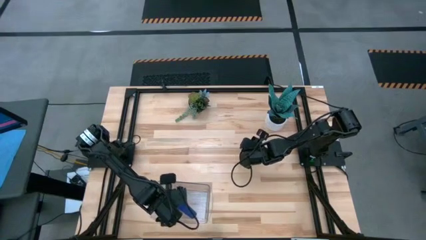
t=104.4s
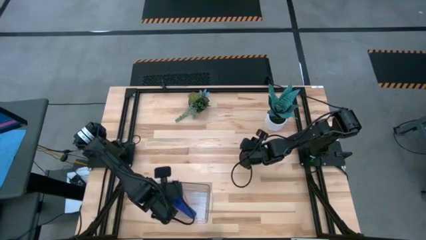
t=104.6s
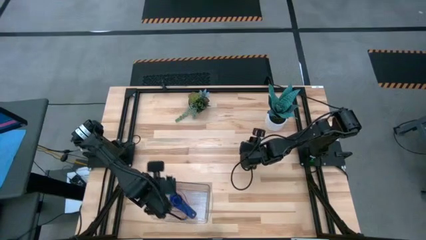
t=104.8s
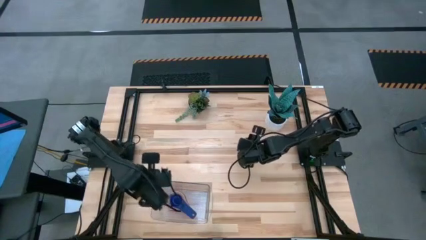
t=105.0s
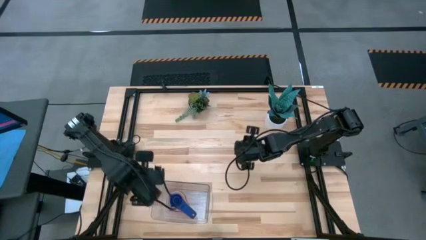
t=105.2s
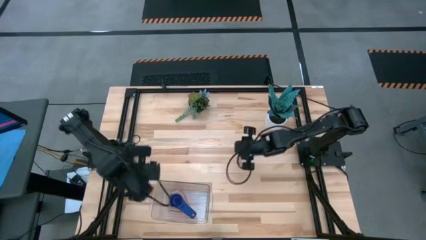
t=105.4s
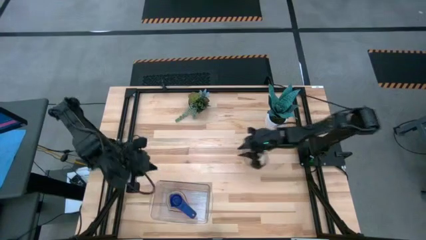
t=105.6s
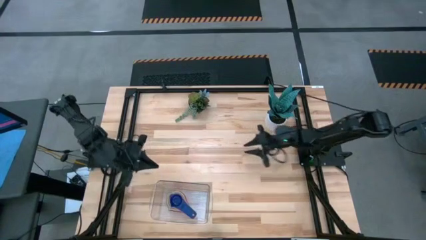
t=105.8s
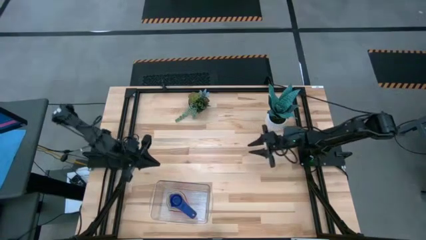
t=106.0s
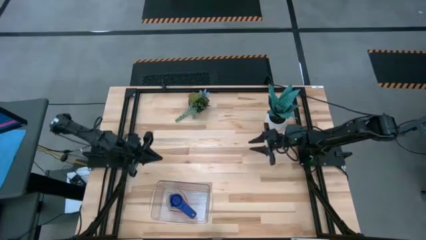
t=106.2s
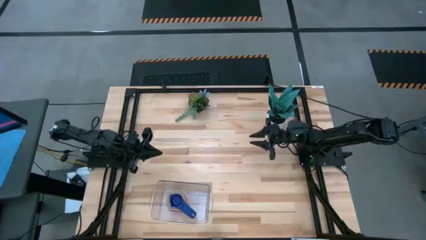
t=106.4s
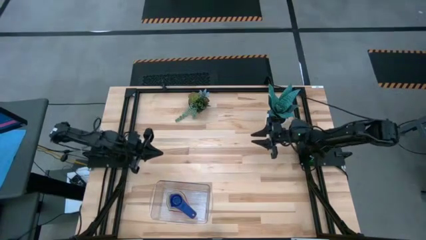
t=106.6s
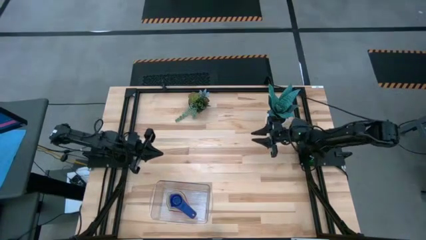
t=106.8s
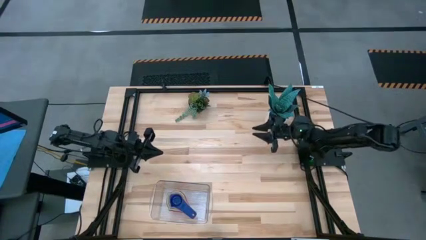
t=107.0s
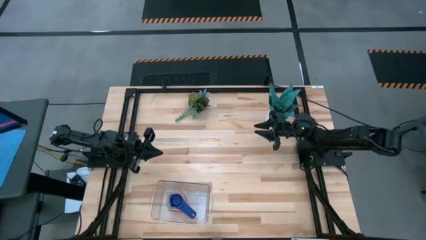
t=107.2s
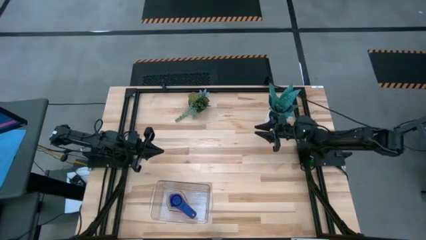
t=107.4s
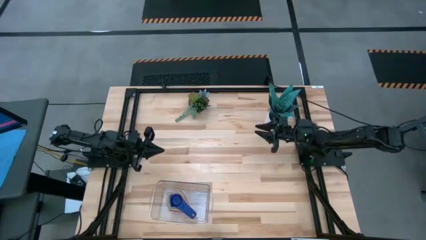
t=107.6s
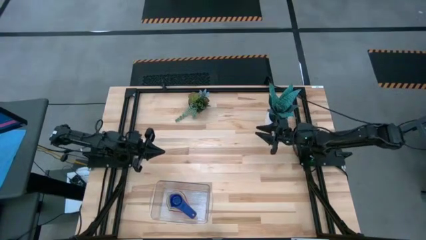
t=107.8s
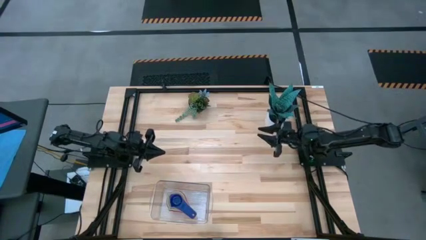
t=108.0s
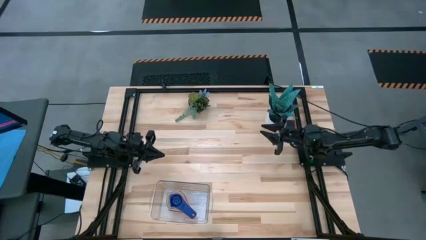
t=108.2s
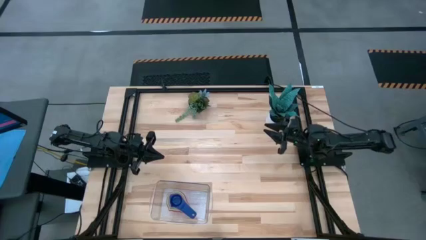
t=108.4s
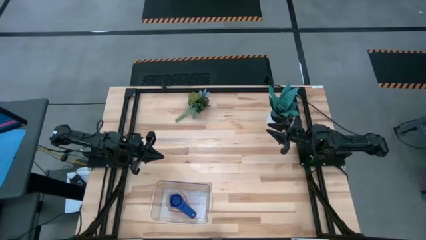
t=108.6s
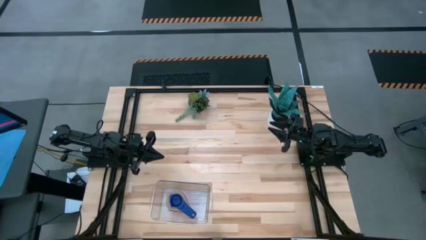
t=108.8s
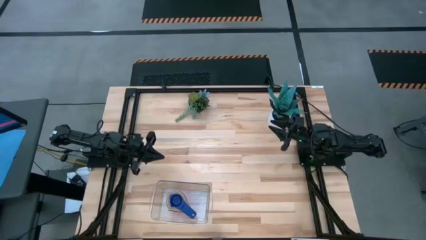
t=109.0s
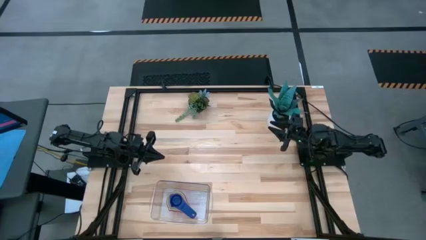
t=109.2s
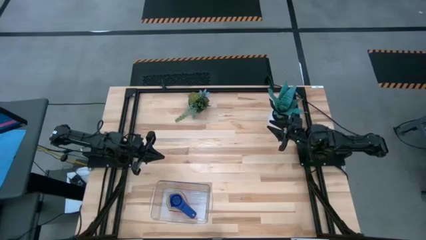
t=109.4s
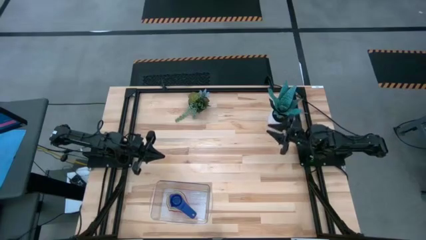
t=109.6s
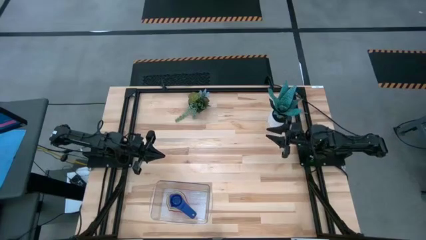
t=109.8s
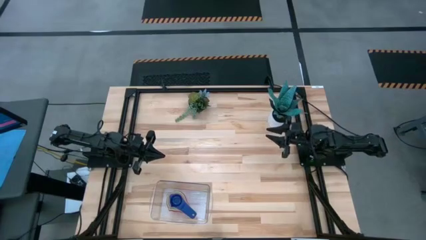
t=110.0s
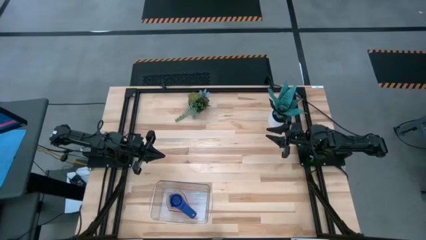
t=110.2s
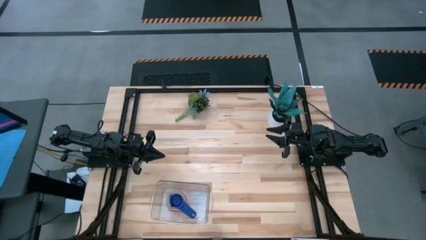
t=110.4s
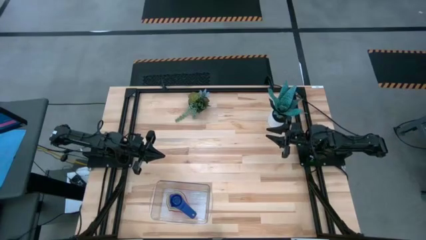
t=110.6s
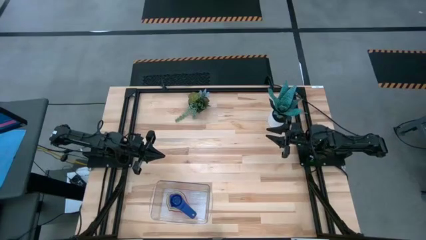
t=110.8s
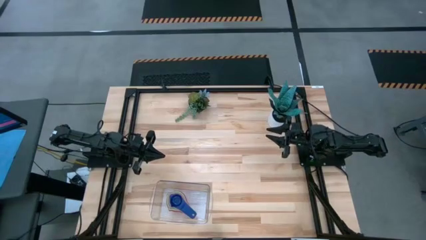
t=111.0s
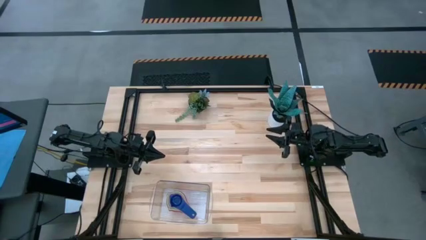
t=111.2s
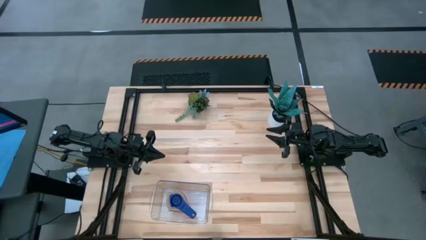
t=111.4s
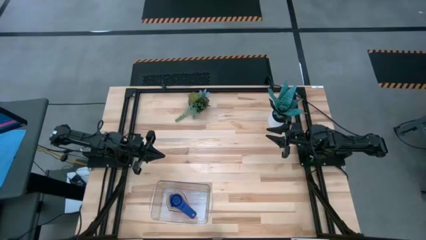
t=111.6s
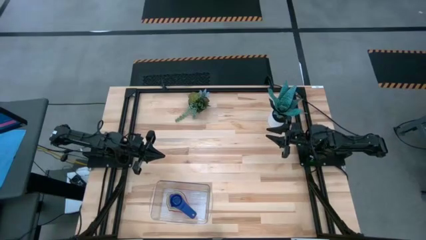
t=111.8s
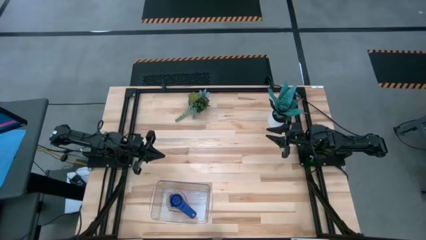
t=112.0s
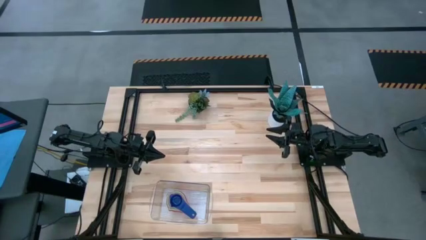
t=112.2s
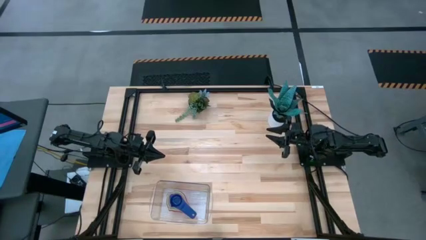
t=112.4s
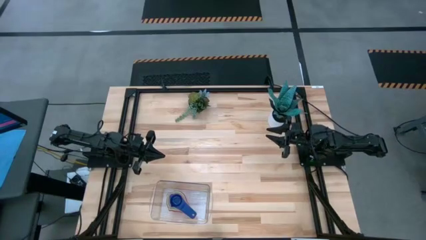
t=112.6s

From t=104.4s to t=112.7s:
Task: Nest measuring cups in basket
Return to Home Position

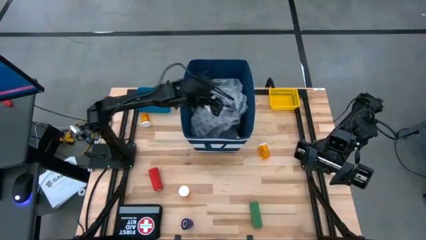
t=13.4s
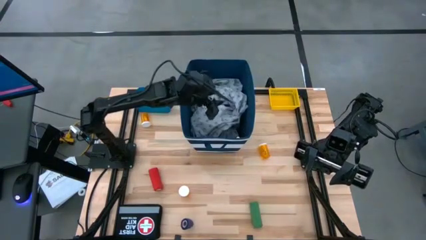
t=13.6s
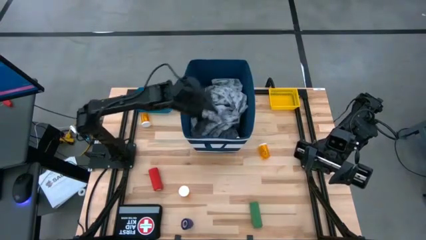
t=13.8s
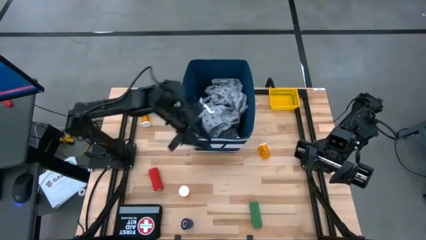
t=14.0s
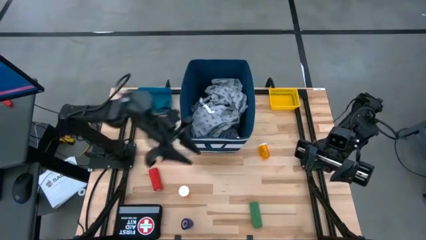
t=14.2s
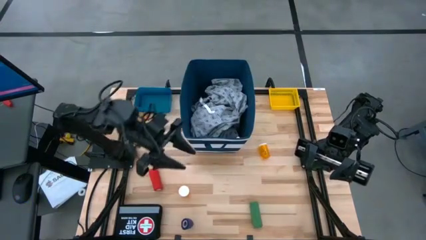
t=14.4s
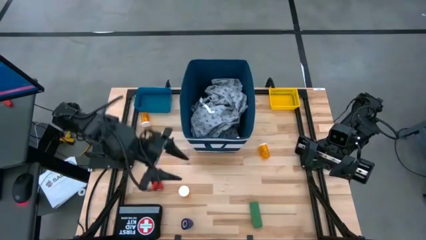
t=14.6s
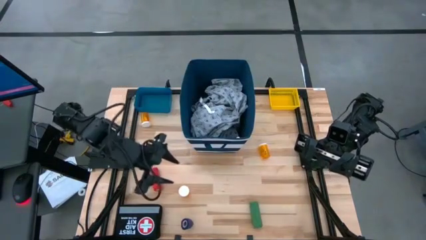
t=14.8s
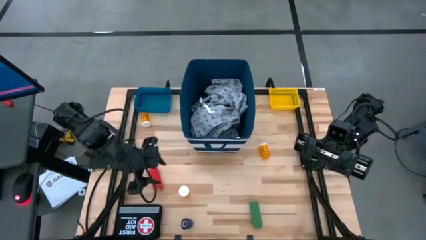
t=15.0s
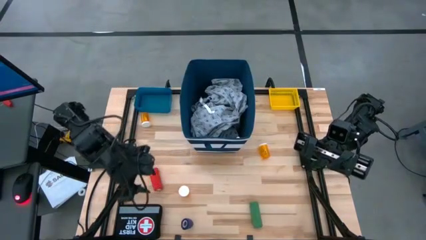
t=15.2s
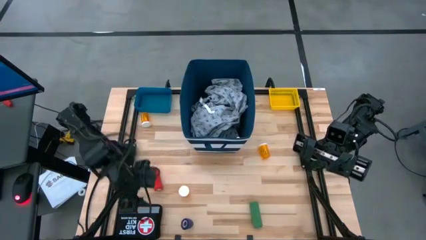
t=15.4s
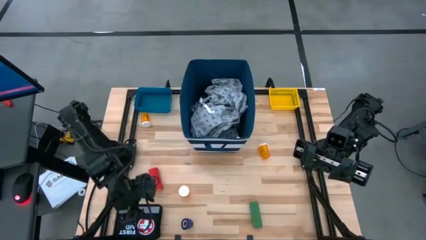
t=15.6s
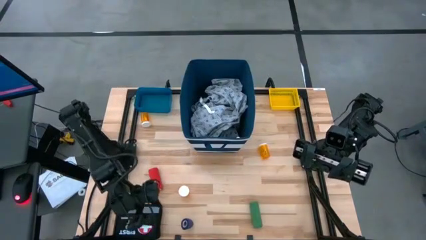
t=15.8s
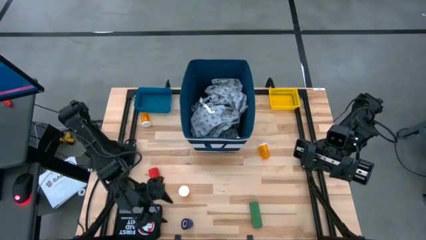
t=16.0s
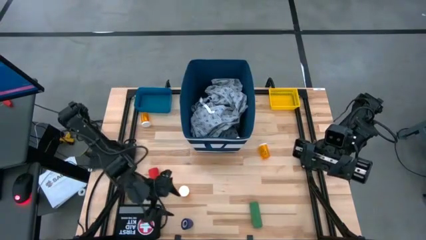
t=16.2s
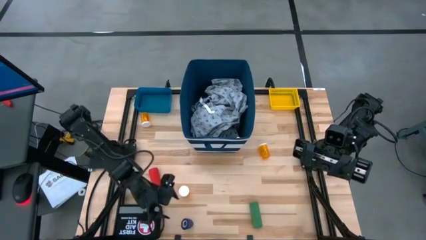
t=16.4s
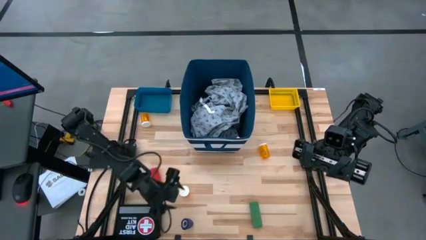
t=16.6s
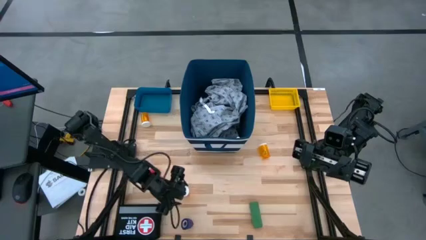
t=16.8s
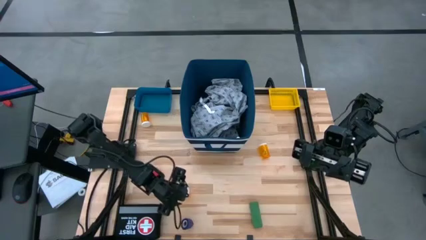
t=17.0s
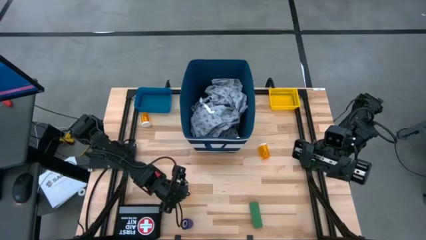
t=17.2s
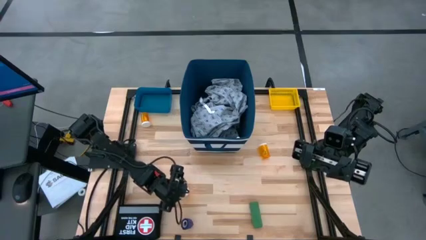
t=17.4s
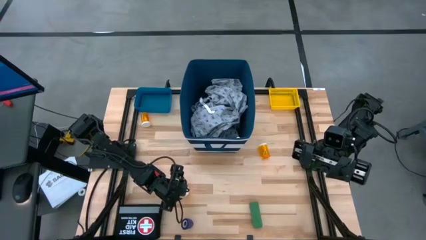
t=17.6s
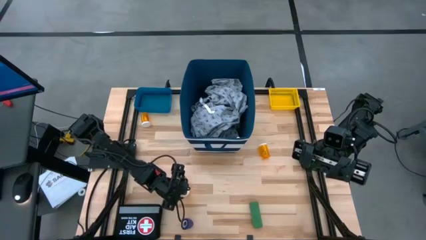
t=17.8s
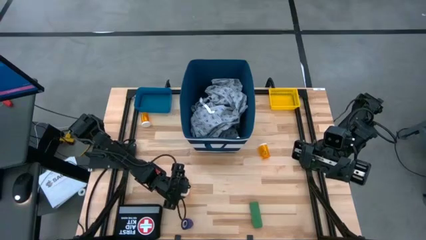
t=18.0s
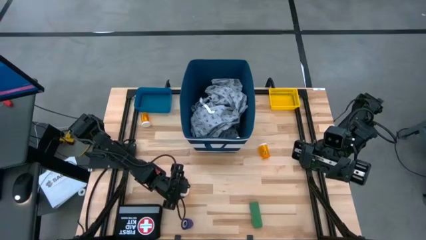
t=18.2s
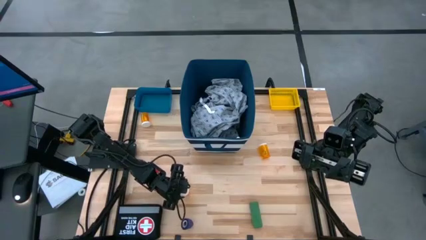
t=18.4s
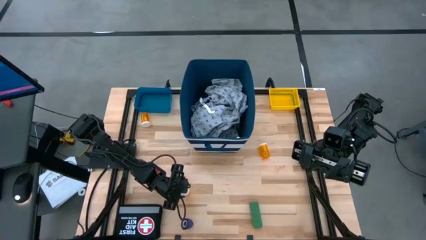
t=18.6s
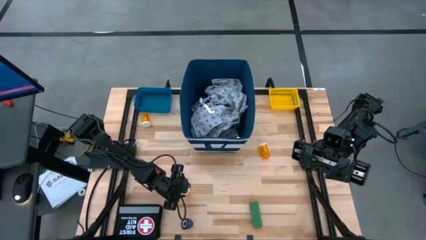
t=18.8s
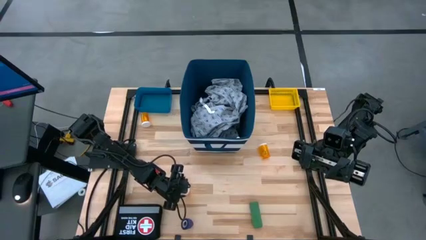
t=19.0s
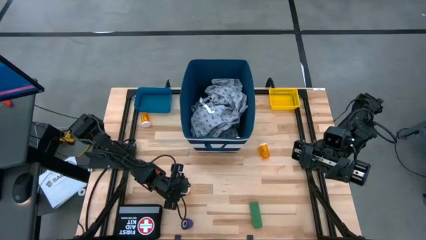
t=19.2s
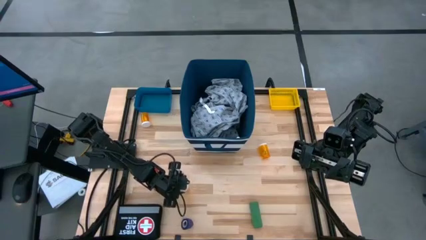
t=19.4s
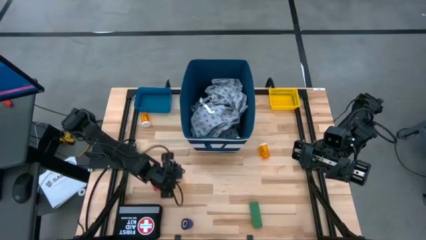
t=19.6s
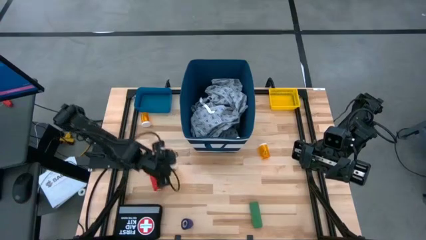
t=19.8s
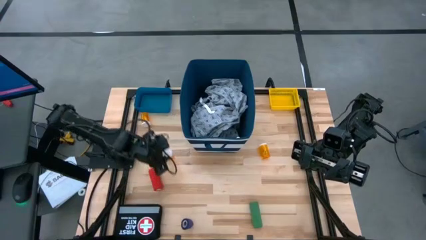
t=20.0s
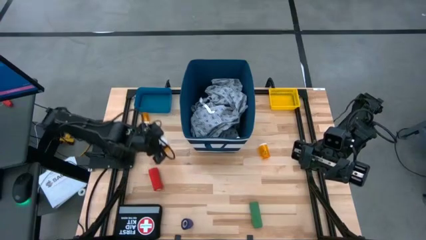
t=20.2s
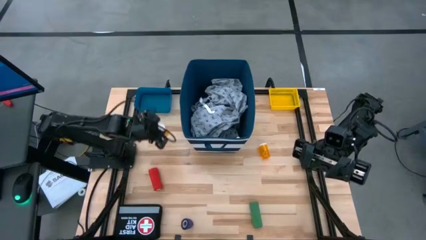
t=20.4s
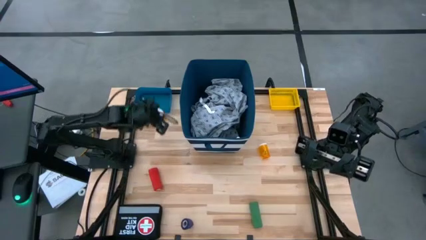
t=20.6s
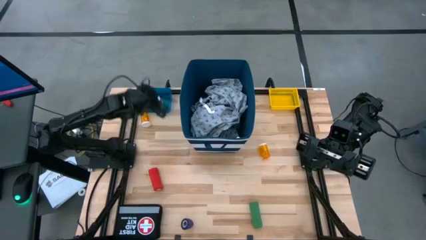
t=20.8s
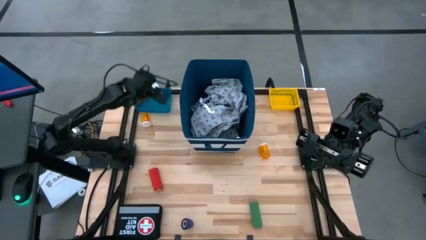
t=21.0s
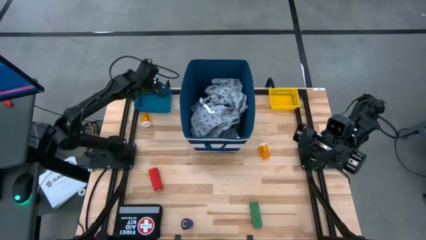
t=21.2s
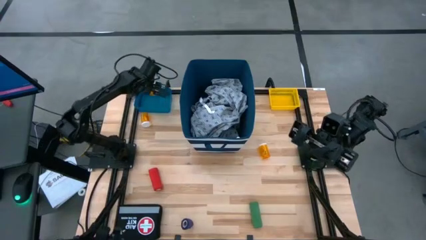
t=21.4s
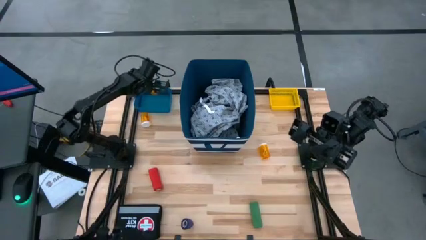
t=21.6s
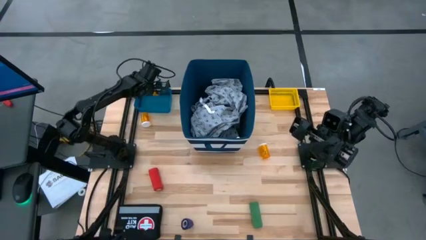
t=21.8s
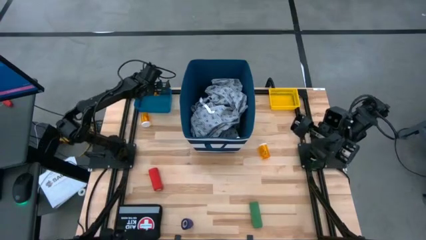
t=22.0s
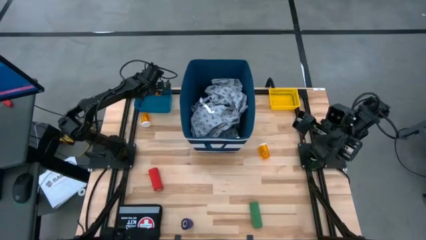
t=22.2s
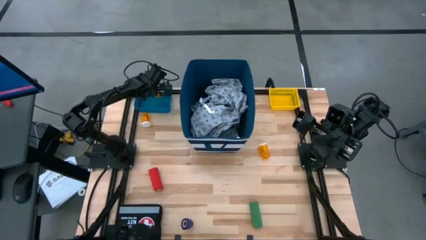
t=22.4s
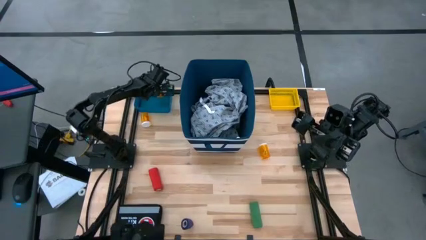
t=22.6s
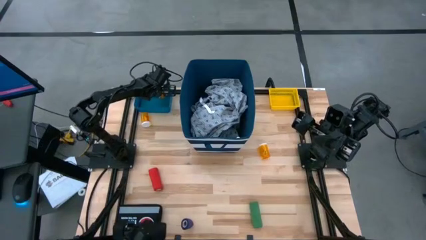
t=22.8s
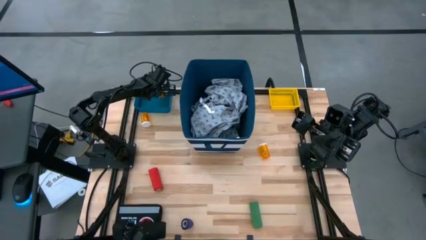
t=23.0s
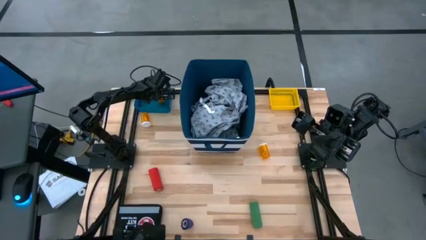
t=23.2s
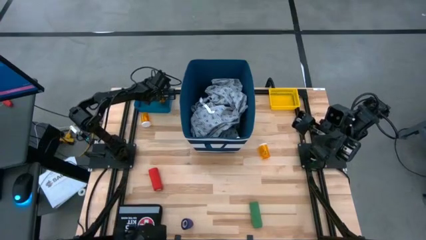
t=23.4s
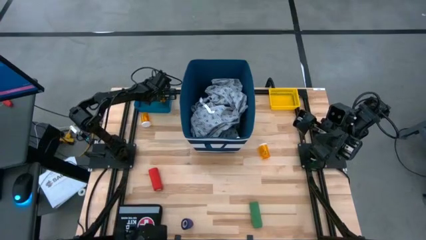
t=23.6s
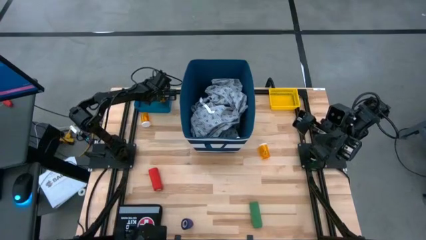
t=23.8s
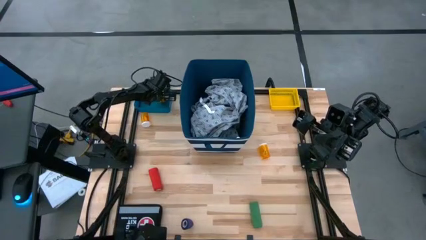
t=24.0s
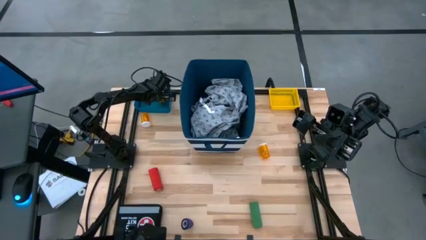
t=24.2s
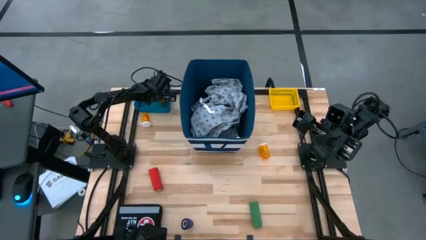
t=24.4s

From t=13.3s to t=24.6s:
Task: Pick & place medical supplies in basket/bin
Put the bottom orange pill bottle into the blue bin
